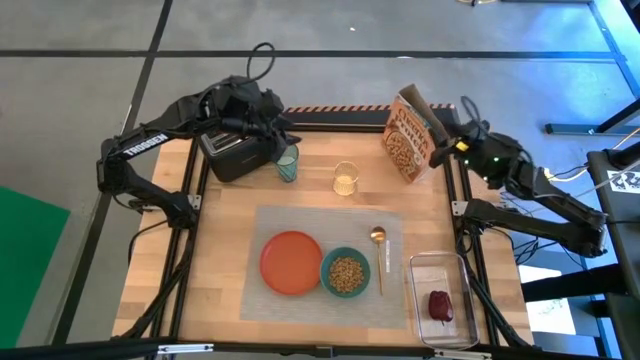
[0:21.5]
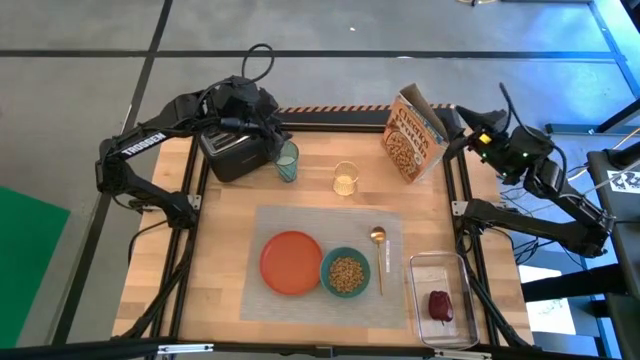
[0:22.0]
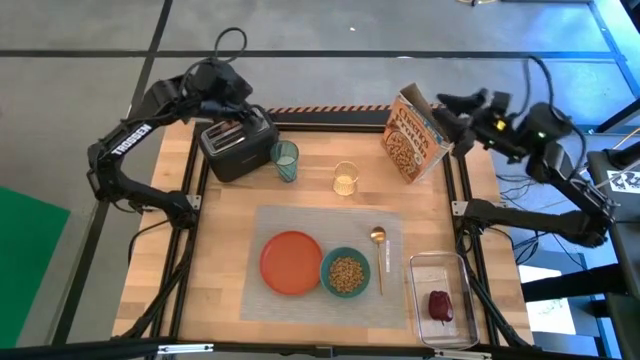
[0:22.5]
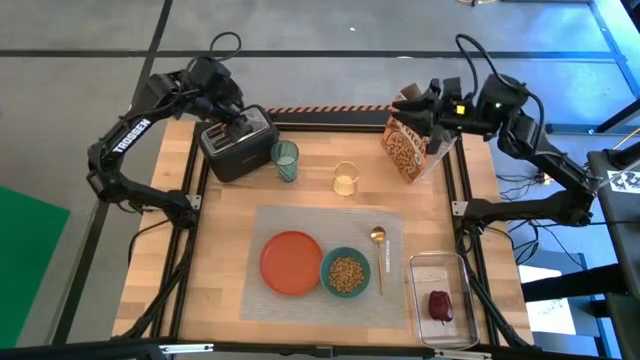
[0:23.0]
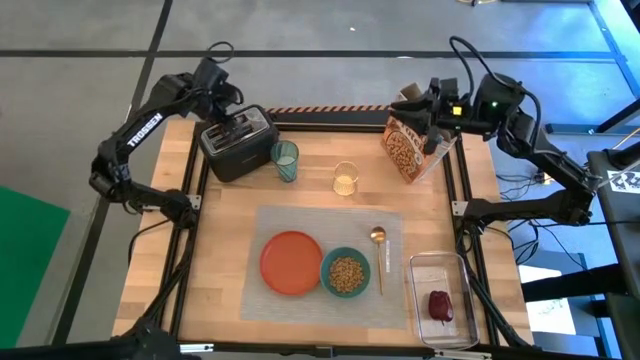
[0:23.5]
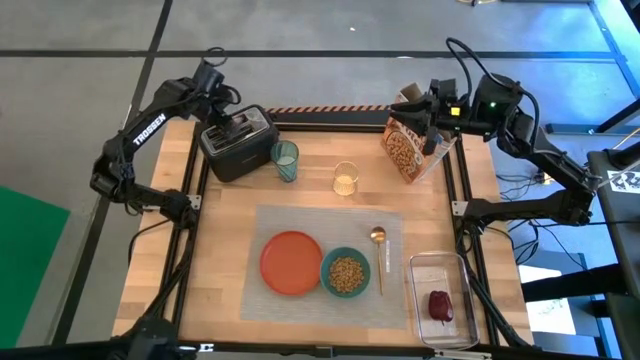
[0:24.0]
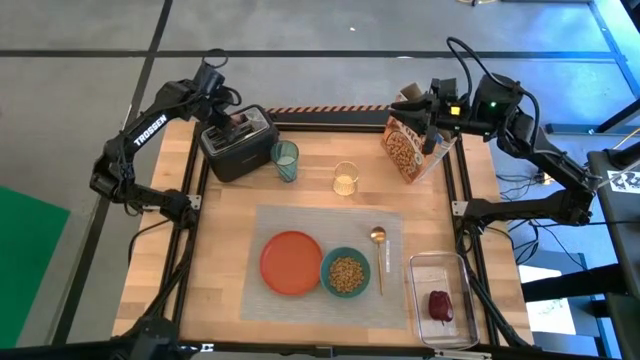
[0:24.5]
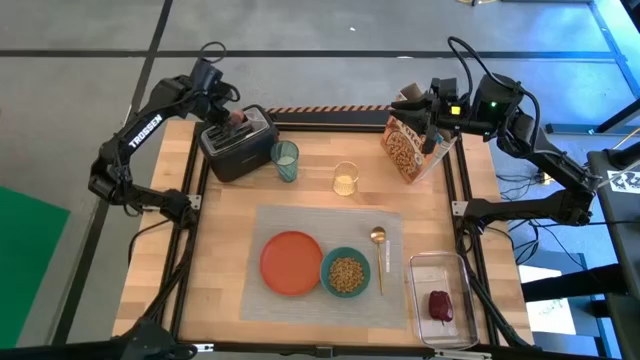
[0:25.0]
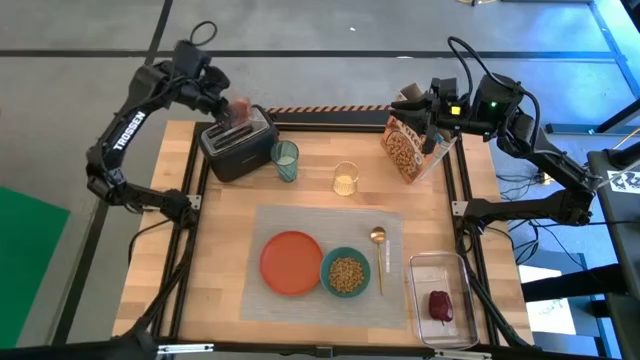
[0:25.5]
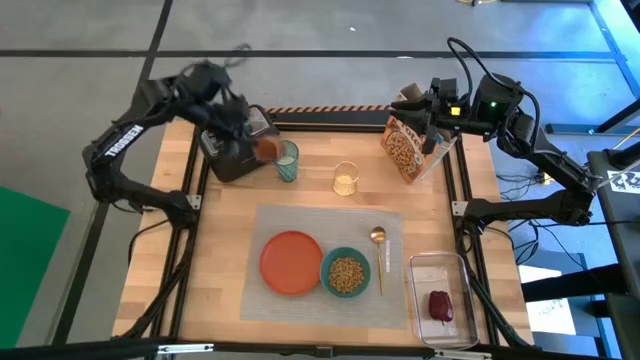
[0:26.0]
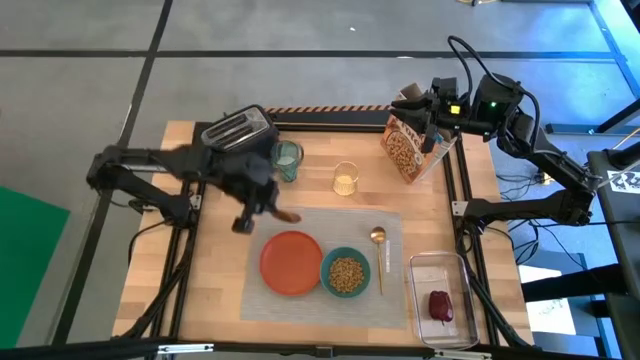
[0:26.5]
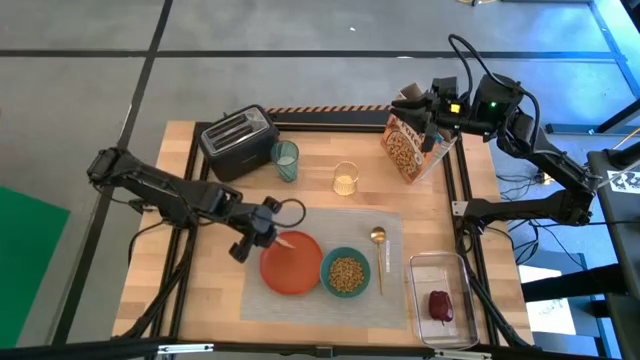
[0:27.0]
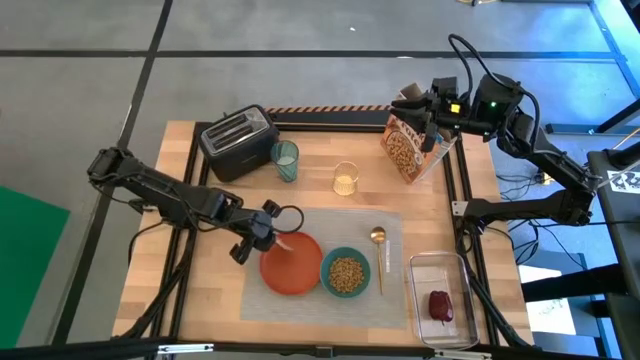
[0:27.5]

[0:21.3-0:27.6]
Task: Arrange a breakfast setting
Put the bread on the orange plate

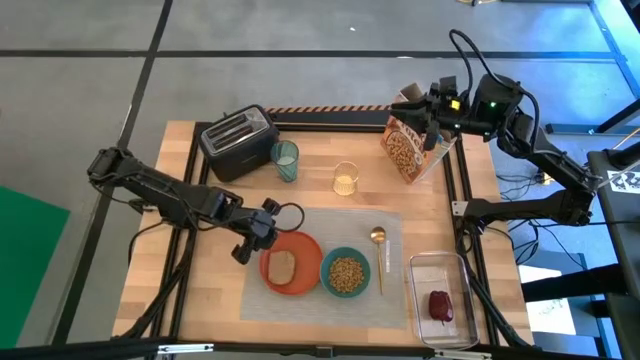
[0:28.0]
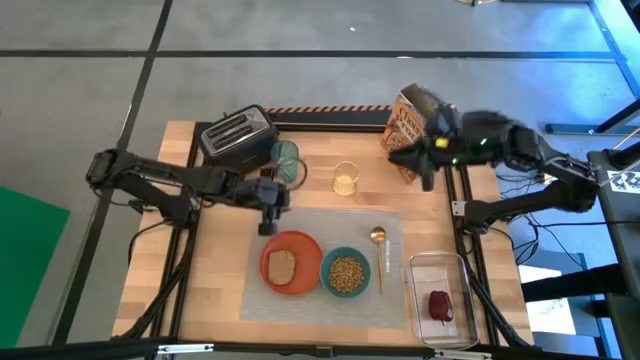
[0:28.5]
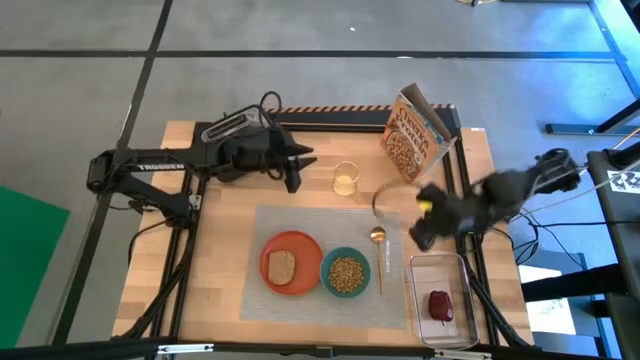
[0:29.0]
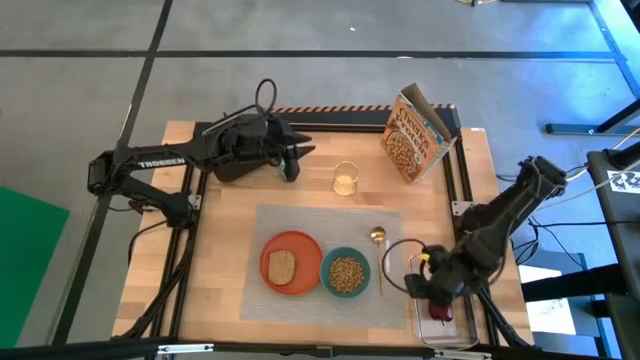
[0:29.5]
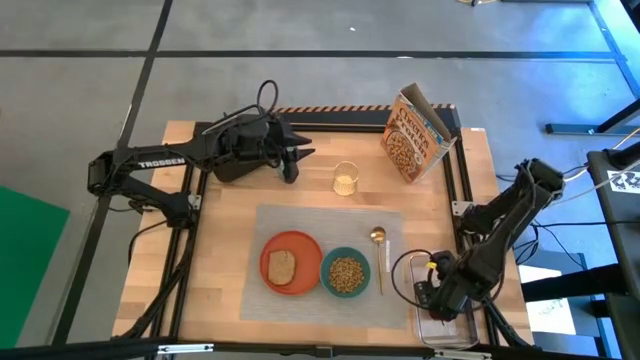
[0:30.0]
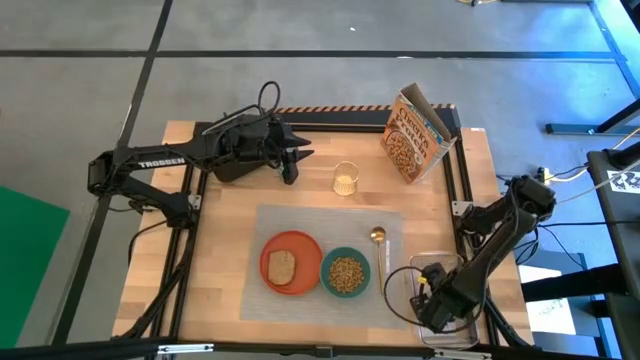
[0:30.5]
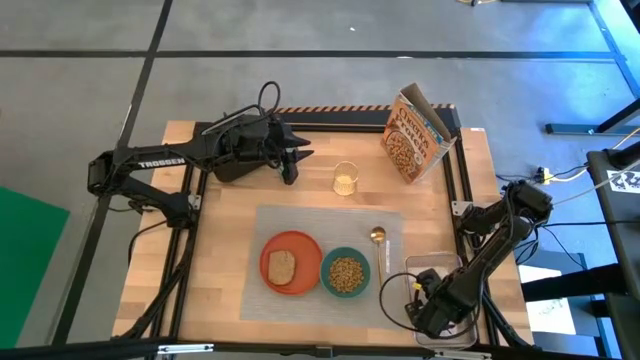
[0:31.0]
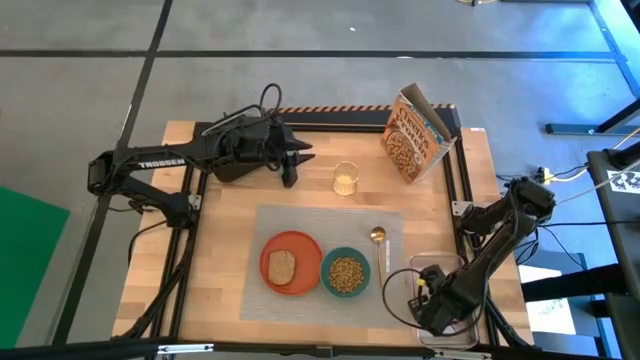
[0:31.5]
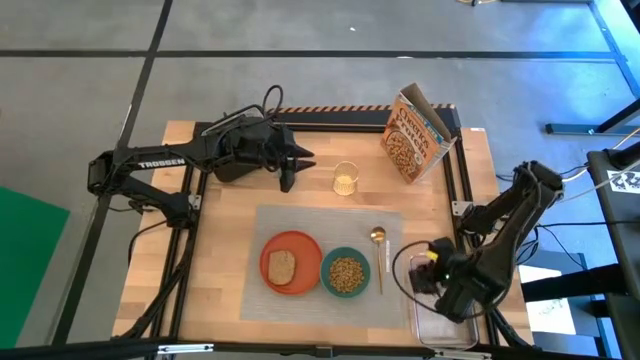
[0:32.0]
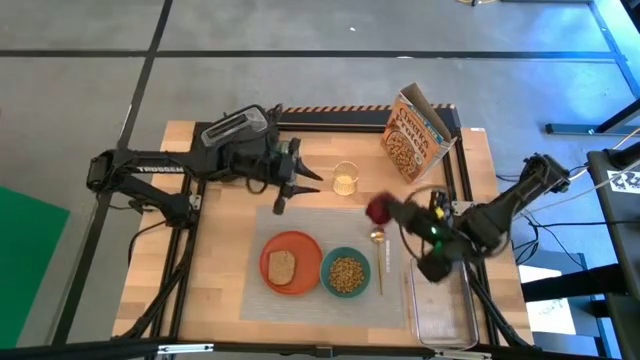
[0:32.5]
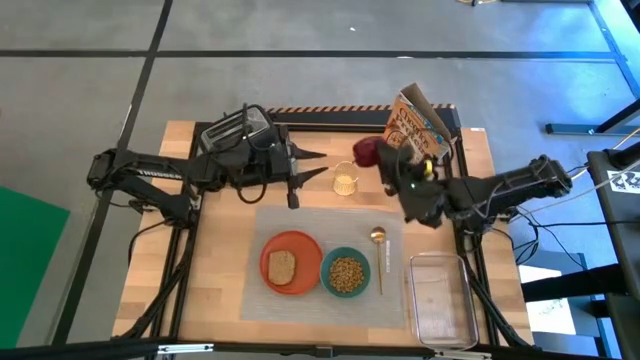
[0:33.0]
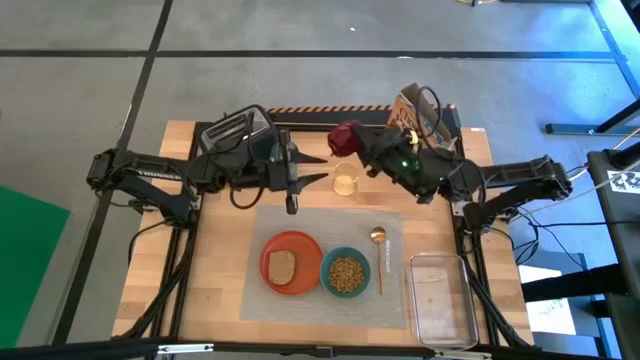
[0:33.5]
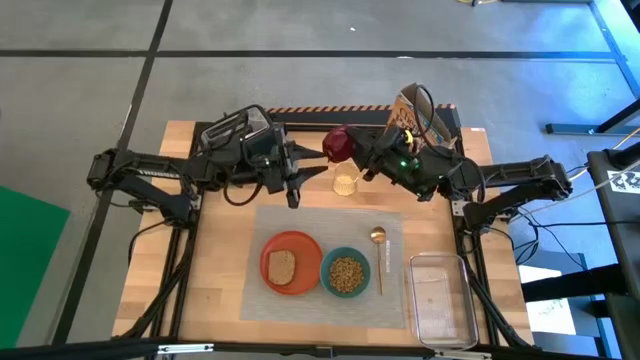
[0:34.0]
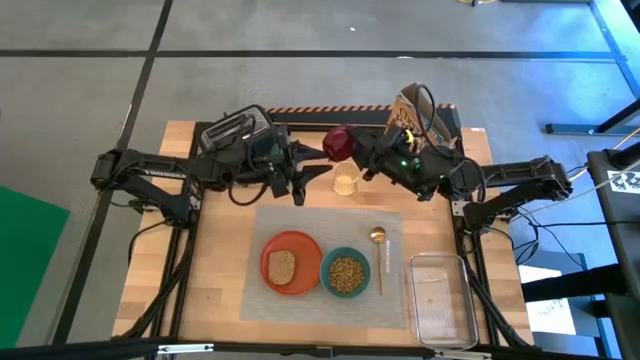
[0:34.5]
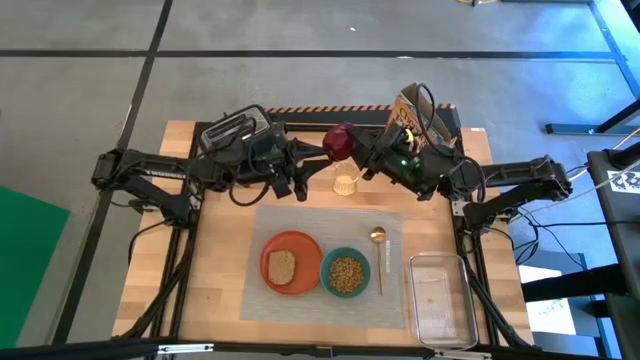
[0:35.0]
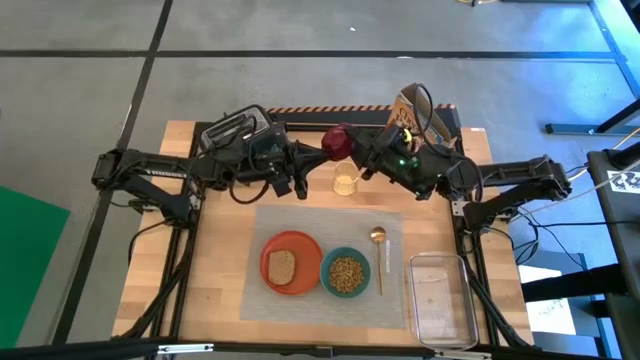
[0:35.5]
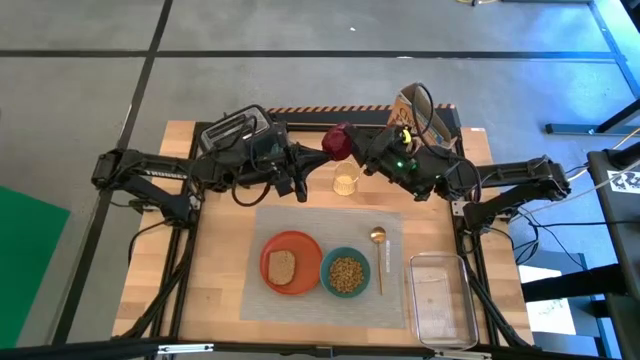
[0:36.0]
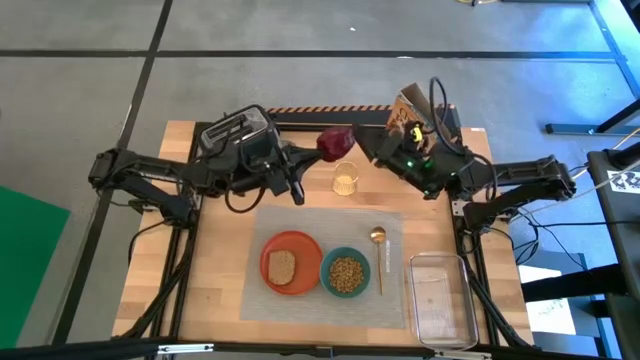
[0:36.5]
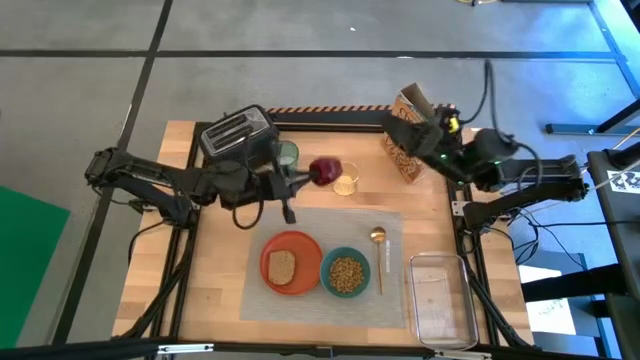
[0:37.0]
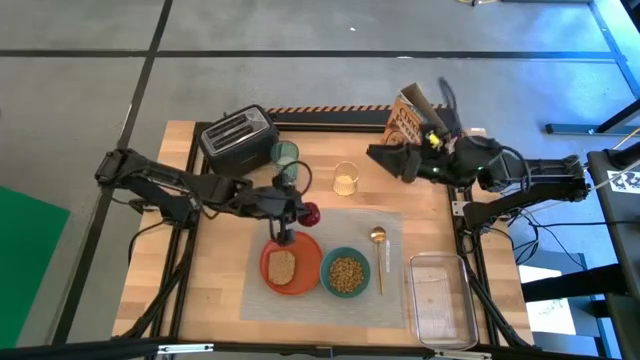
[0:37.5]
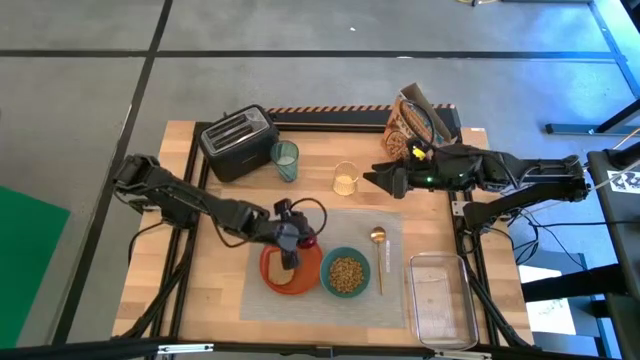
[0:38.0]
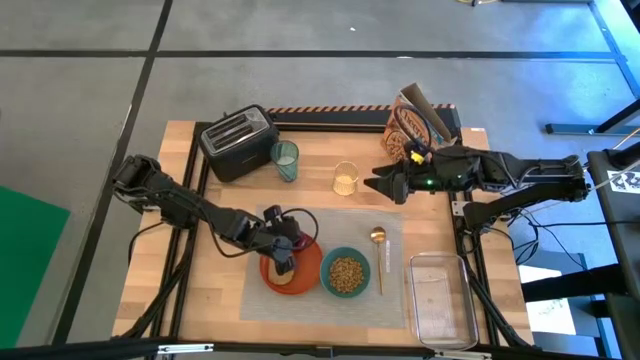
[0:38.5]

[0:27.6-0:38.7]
Put the apple on the orange plate

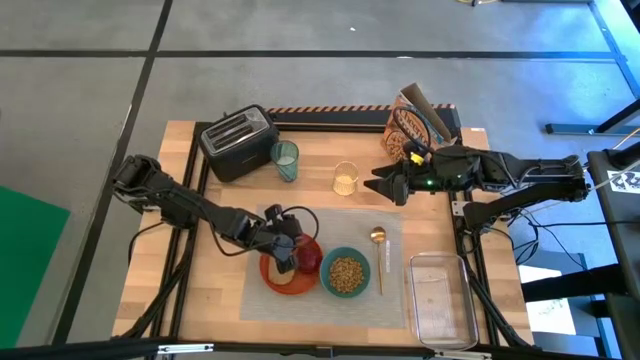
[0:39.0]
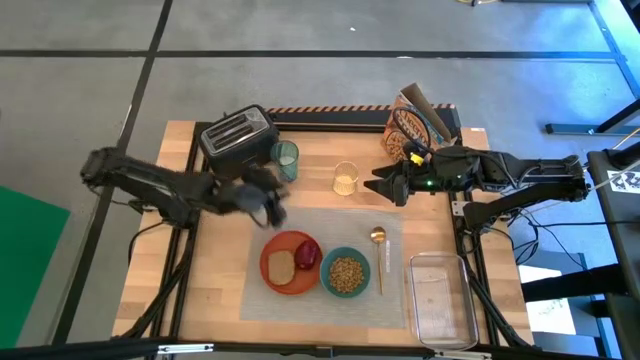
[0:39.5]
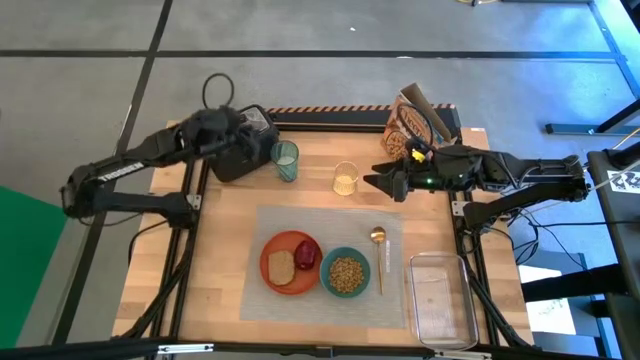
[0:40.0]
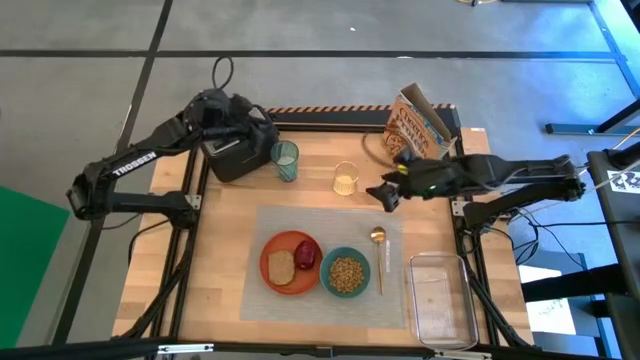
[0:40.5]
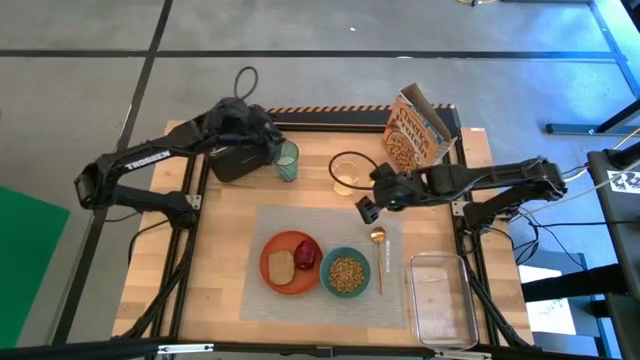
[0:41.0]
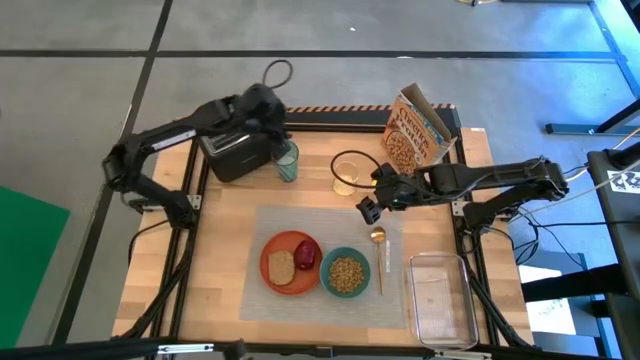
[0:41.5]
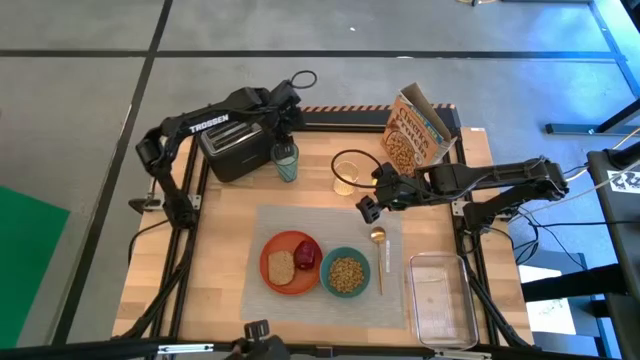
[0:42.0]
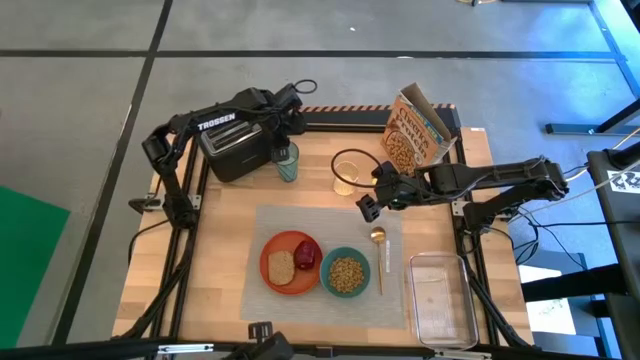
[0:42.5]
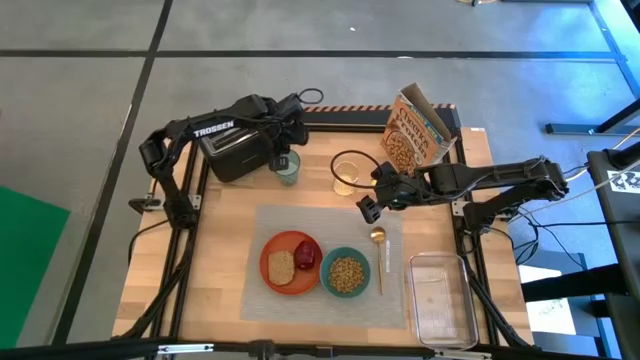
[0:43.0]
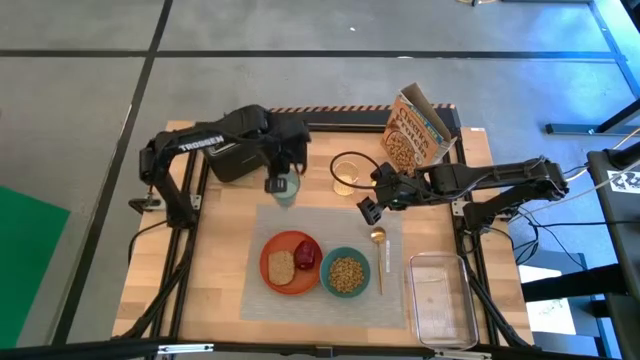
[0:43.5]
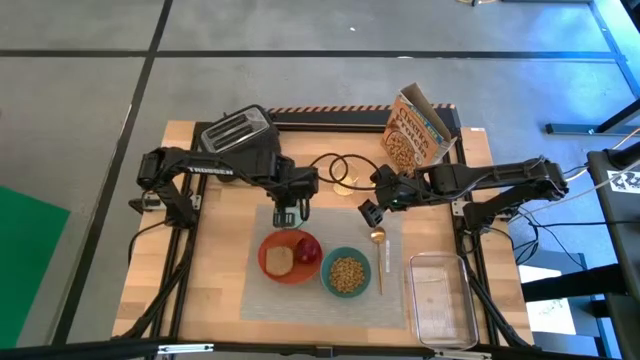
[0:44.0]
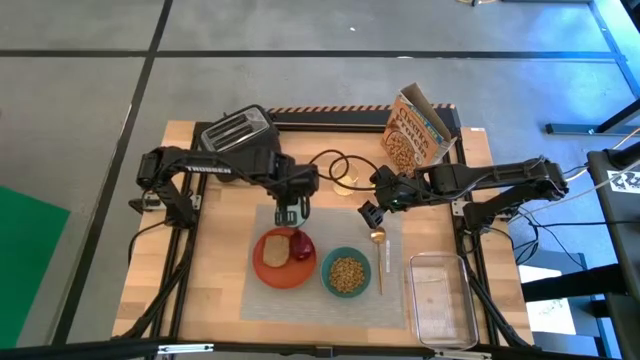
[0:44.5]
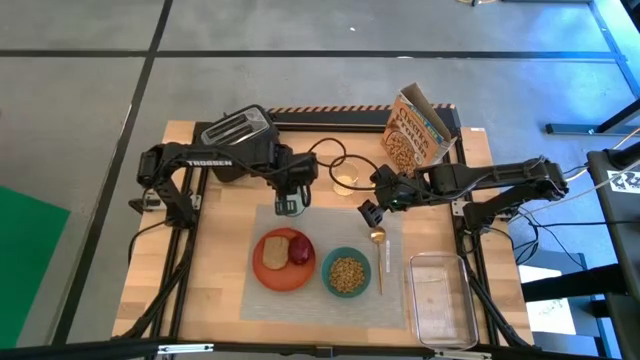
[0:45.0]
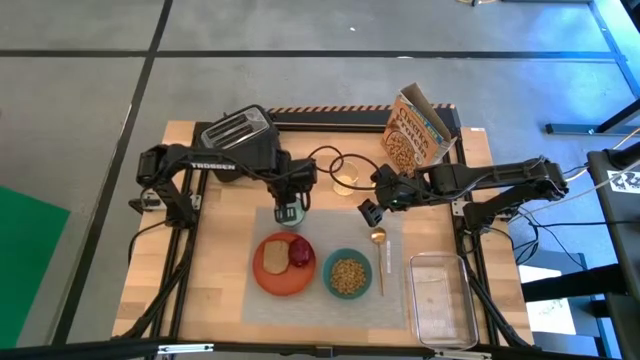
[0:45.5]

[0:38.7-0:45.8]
Put the blue glass on the grey table mat
